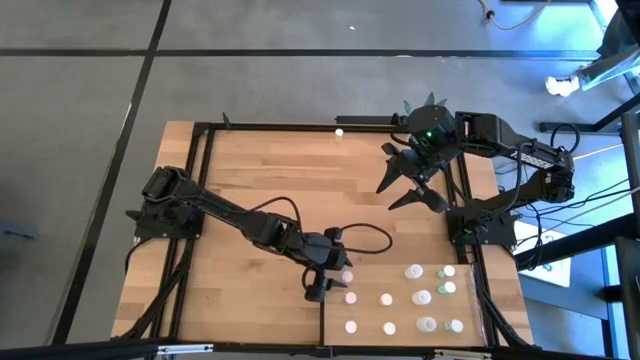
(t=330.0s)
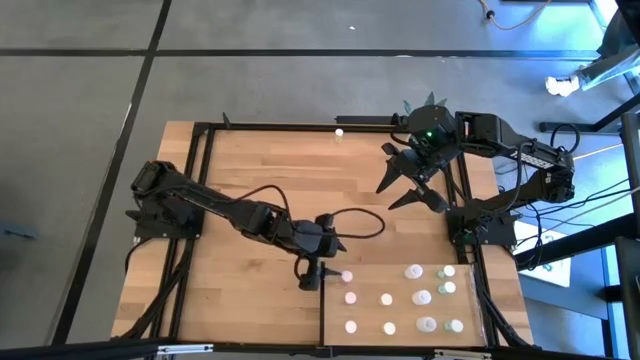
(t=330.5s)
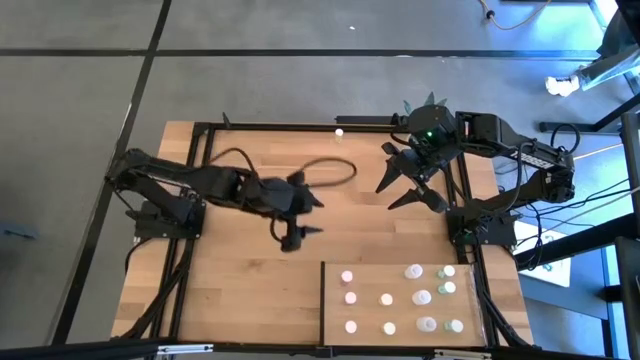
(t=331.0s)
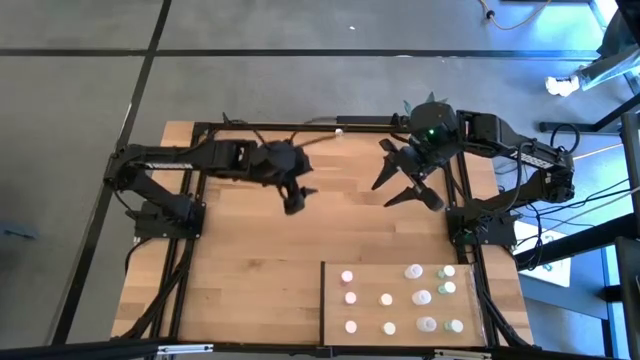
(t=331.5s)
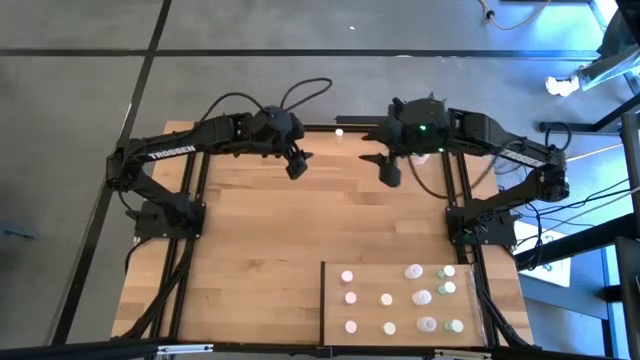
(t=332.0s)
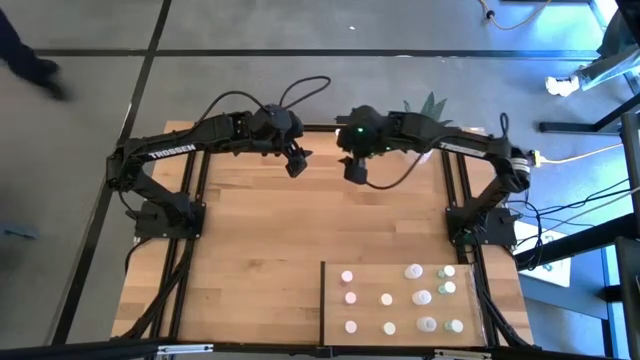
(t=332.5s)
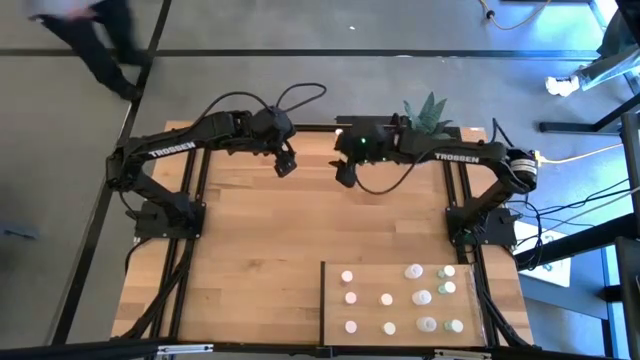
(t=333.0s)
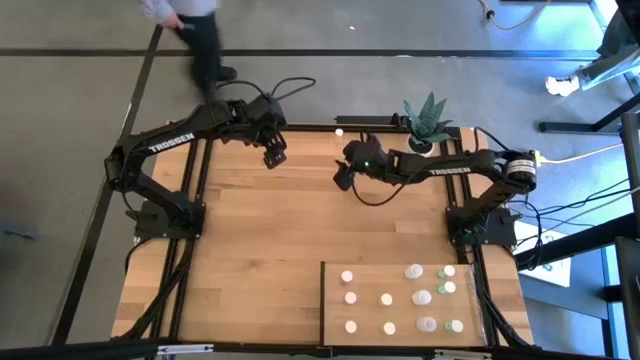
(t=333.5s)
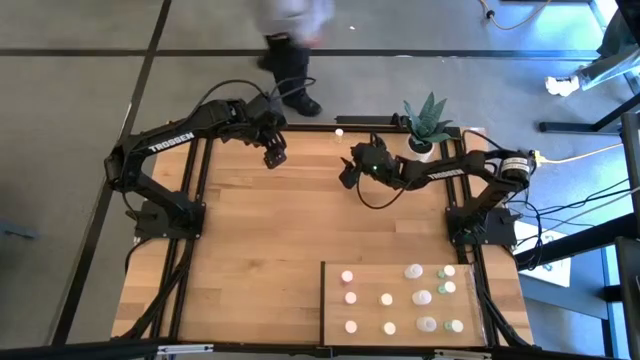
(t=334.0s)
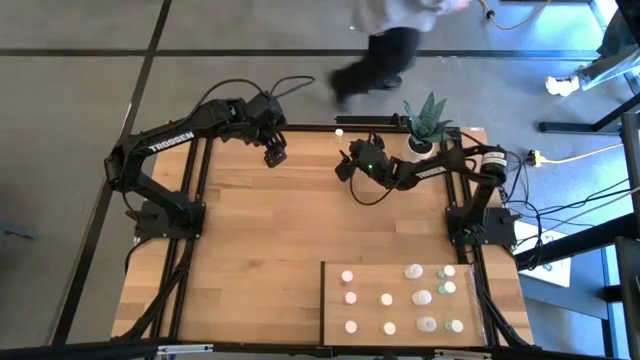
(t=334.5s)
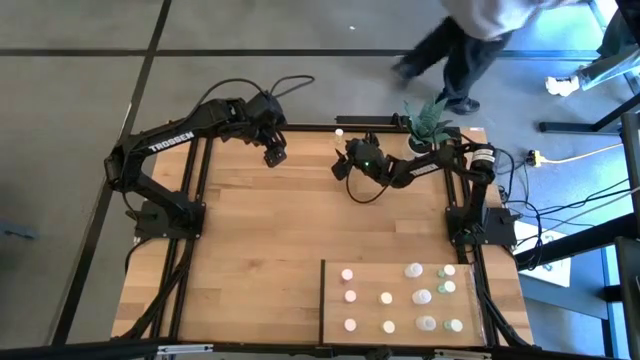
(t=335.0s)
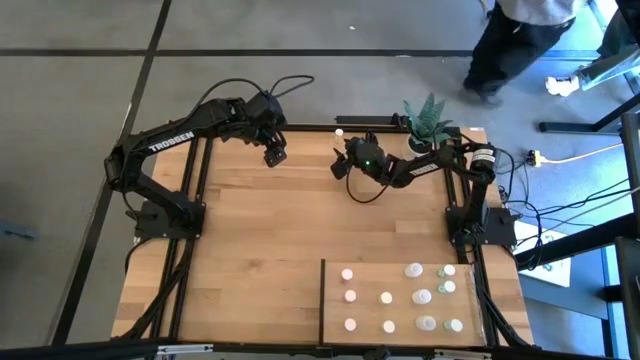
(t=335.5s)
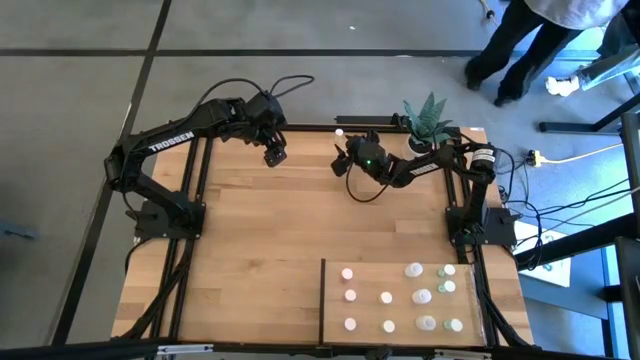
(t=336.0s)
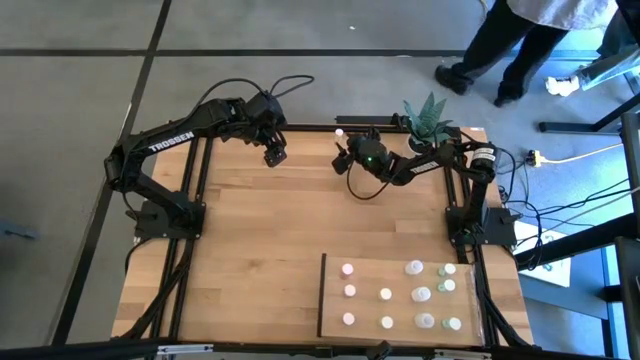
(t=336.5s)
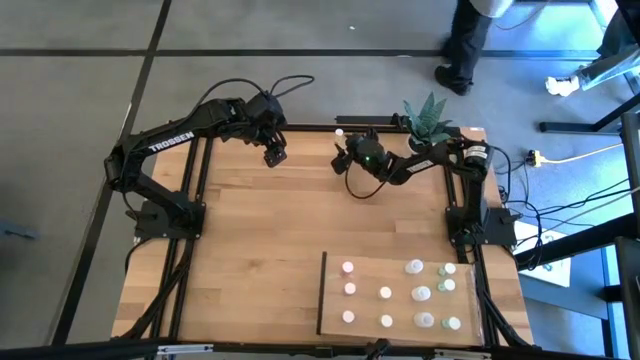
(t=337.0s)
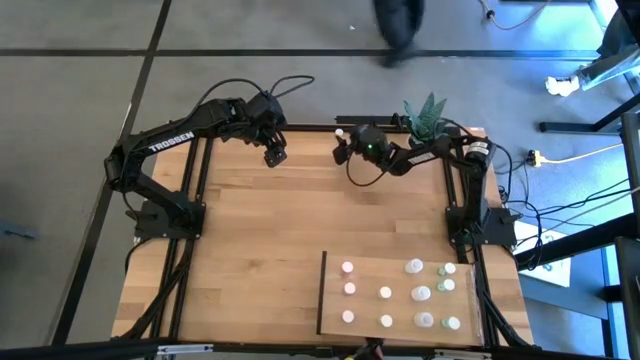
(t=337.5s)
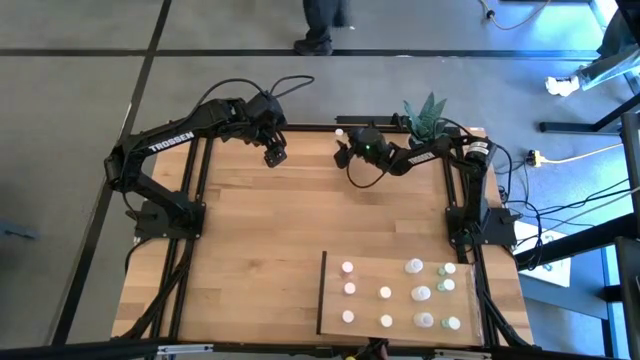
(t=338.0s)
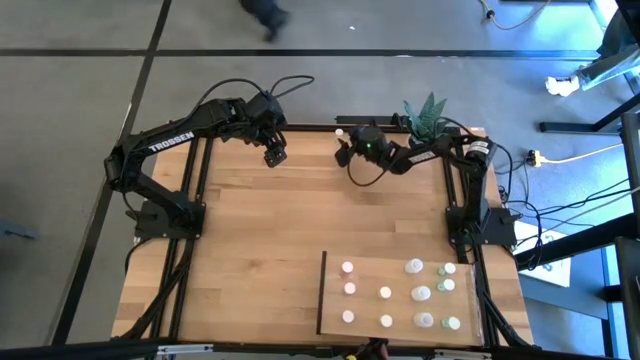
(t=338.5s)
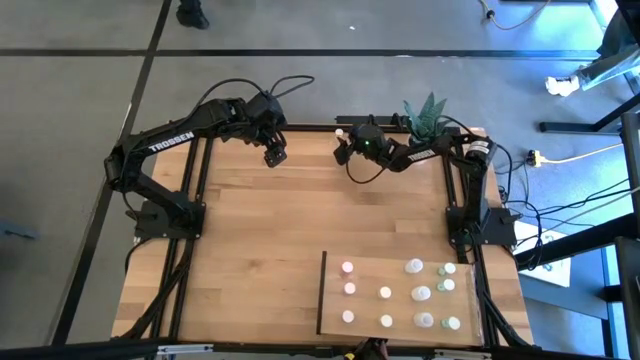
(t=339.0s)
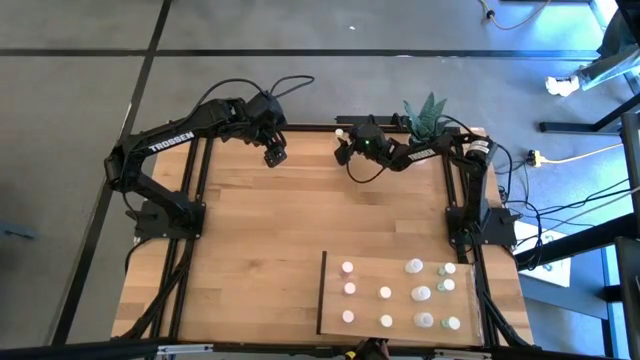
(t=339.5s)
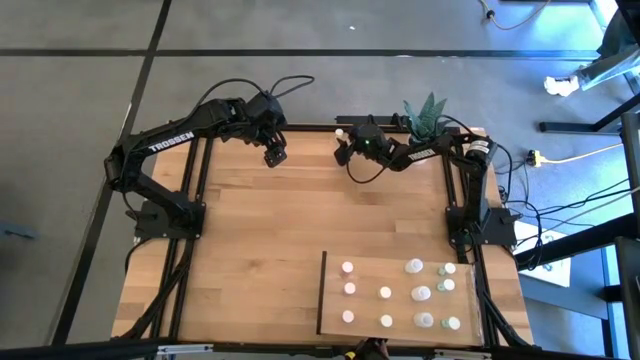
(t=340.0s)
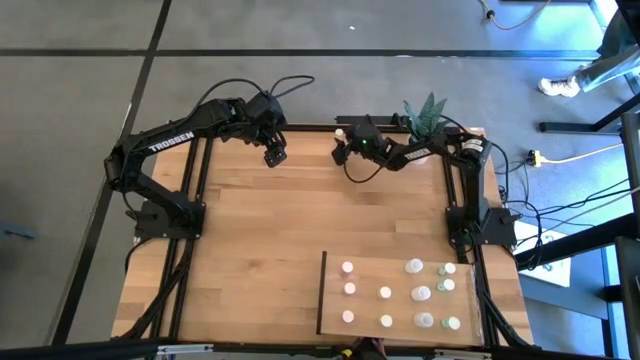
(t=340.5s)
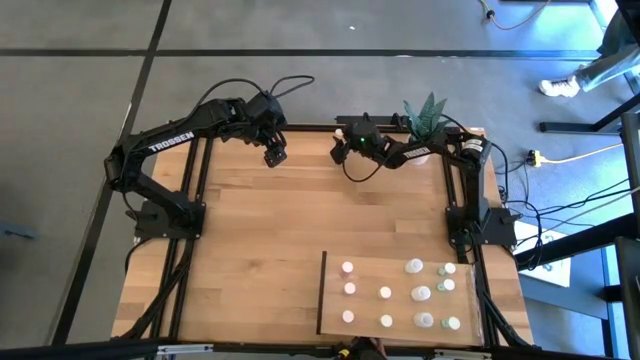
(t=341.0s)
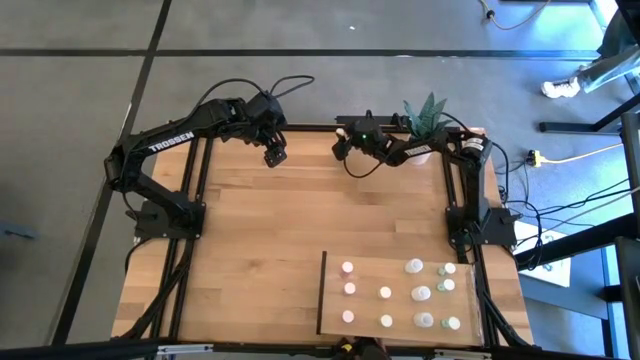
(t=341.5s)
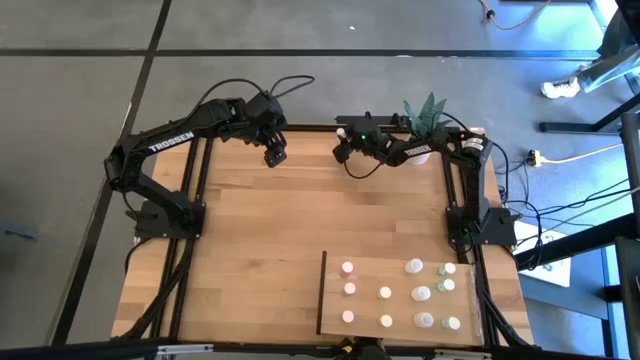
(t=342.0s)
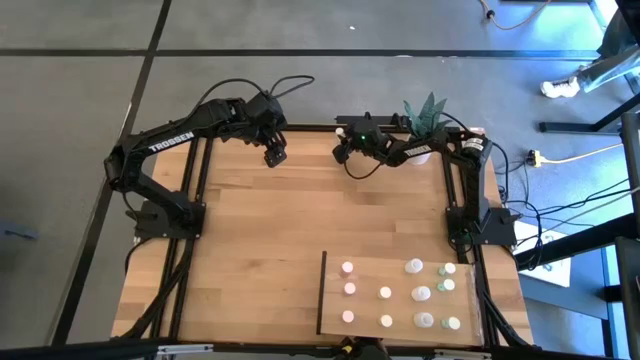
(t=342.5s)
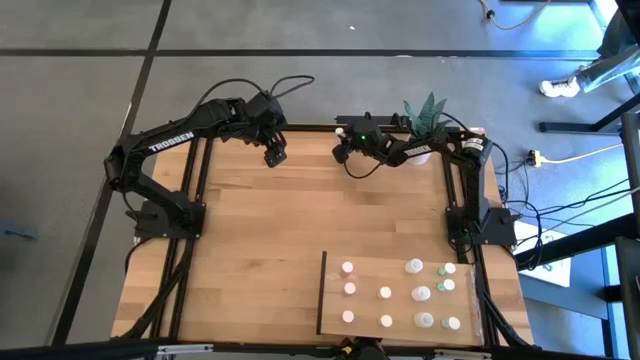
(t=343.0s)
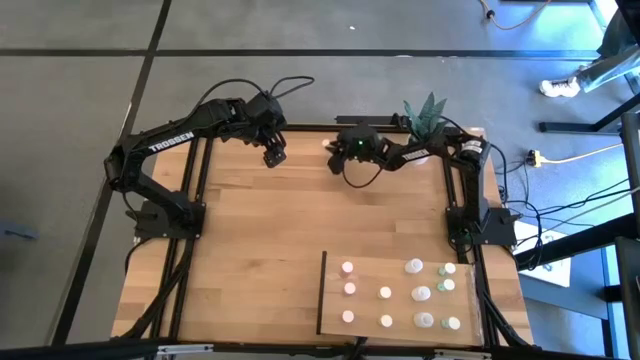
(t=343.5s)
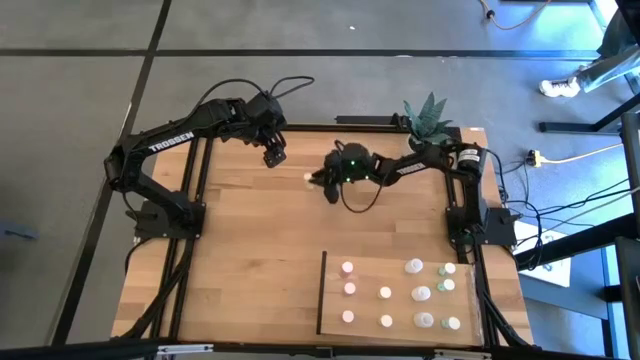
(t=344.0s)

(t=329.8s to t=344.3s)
Task: Pick and place medicine bottles onto shelf by color
Put the yellow pill bottle on the shelf aligned with the other yellow pill bottle

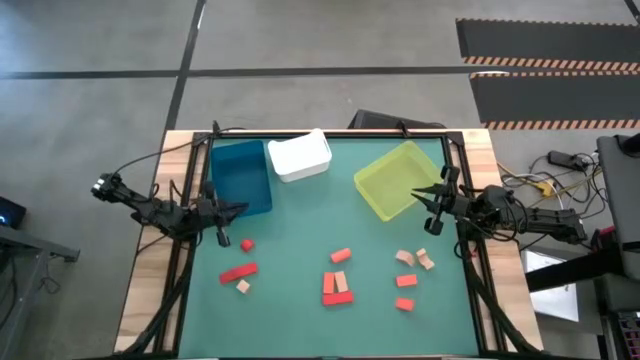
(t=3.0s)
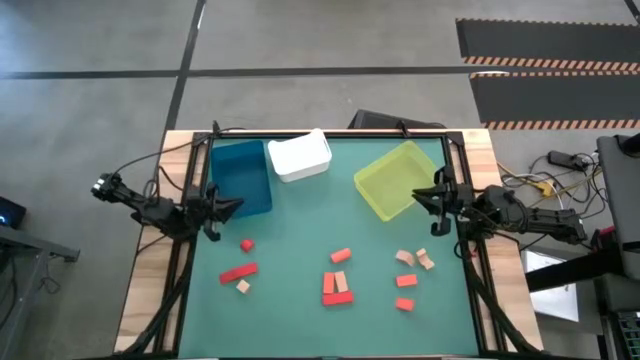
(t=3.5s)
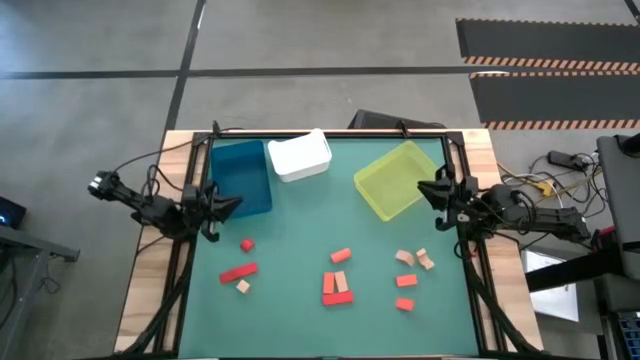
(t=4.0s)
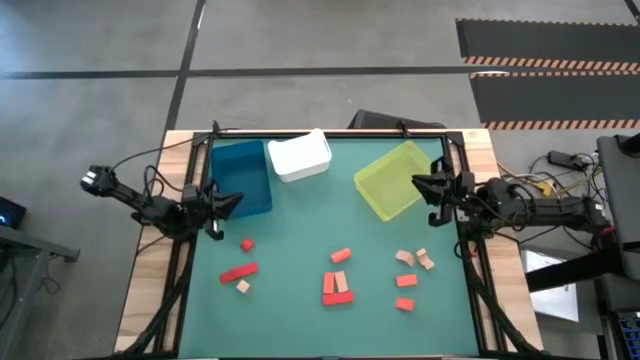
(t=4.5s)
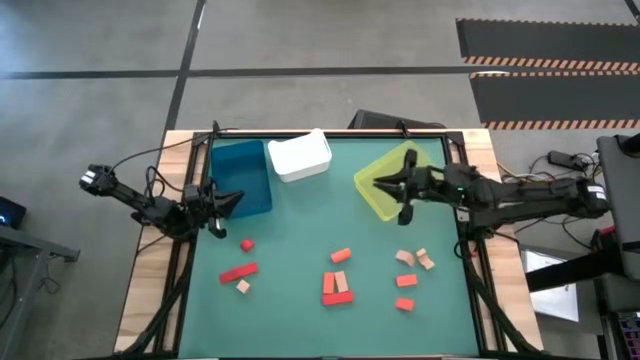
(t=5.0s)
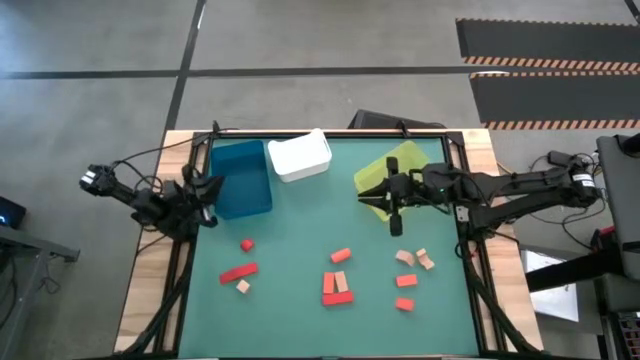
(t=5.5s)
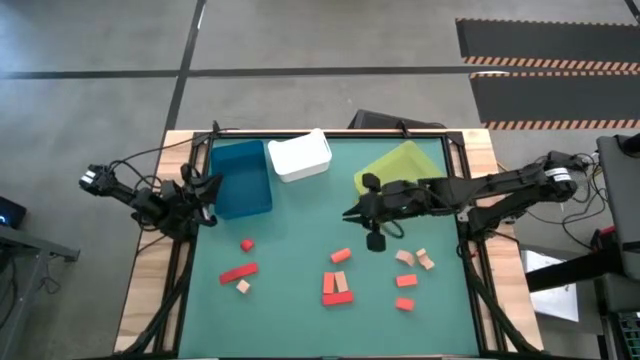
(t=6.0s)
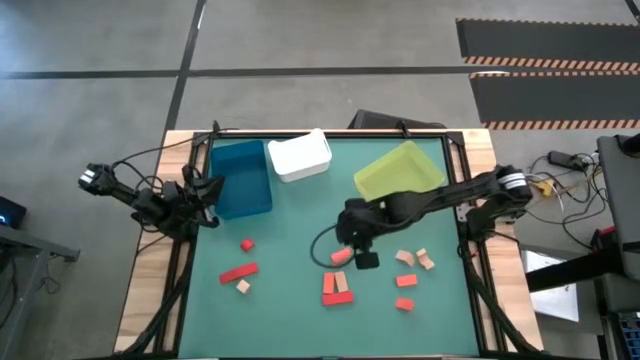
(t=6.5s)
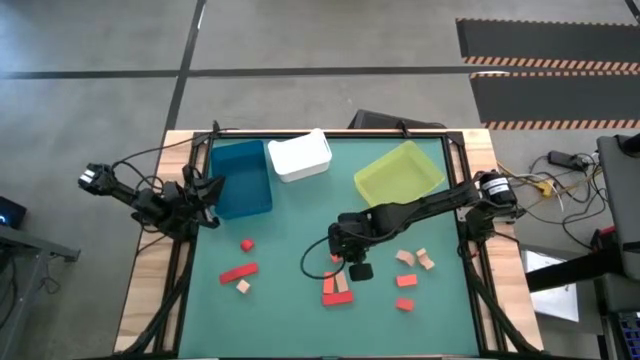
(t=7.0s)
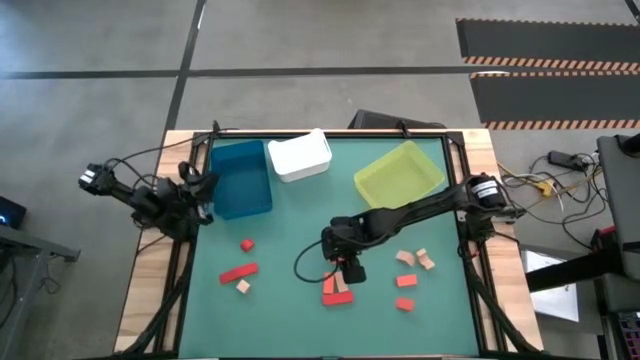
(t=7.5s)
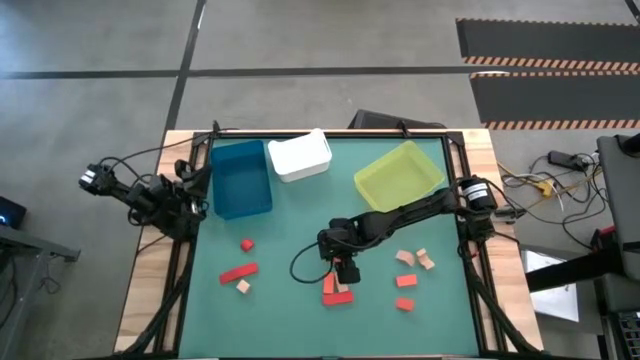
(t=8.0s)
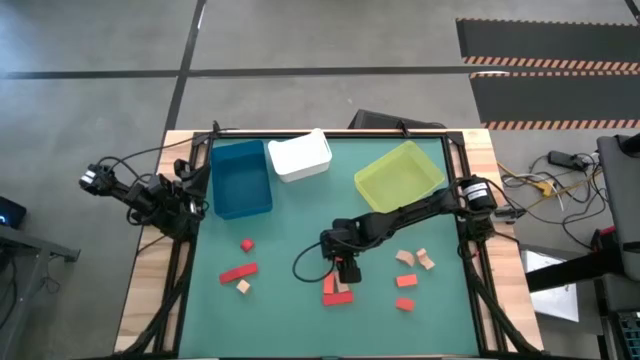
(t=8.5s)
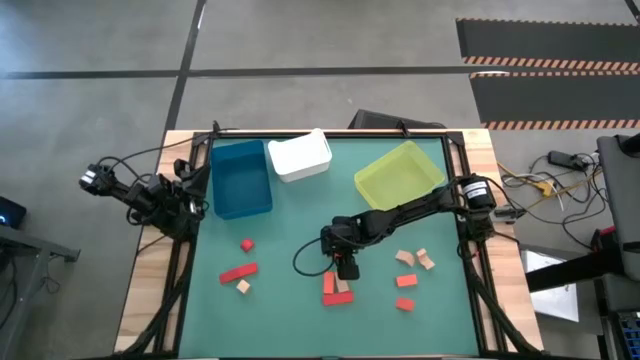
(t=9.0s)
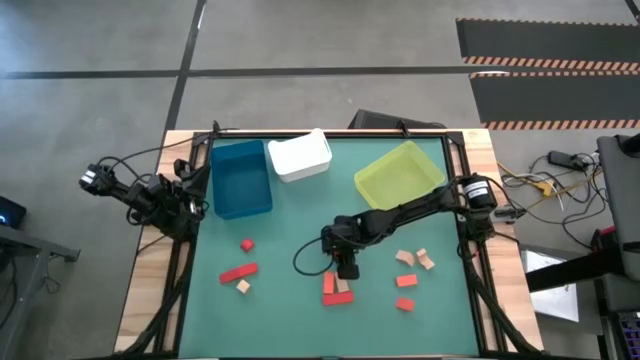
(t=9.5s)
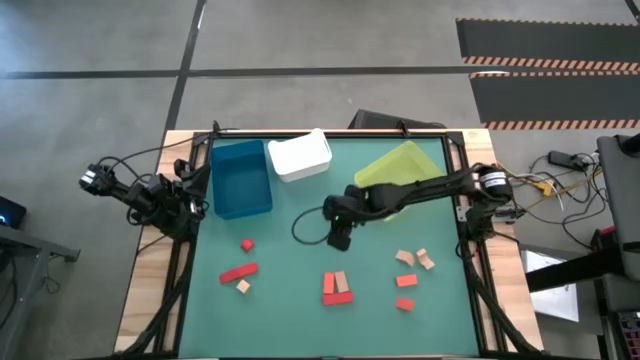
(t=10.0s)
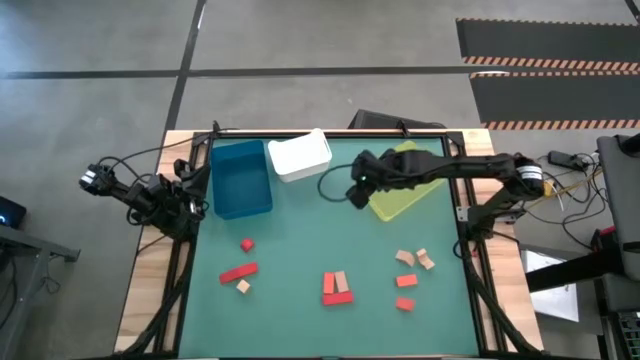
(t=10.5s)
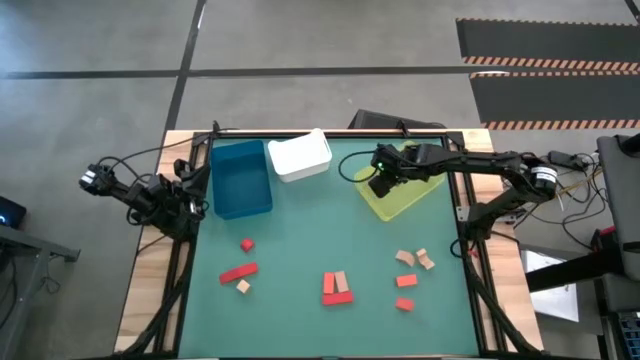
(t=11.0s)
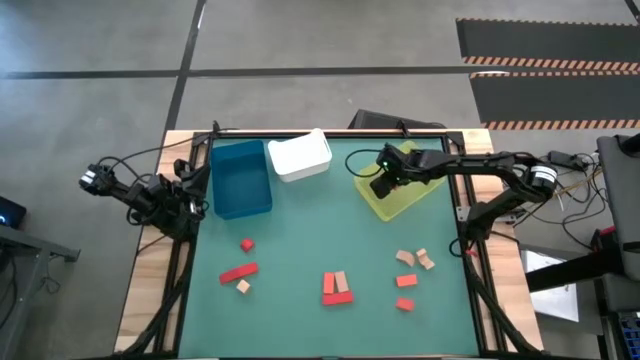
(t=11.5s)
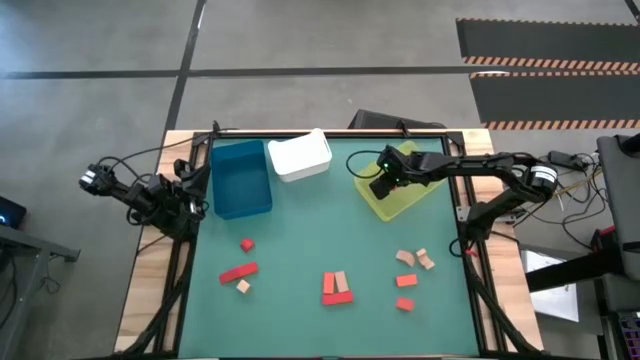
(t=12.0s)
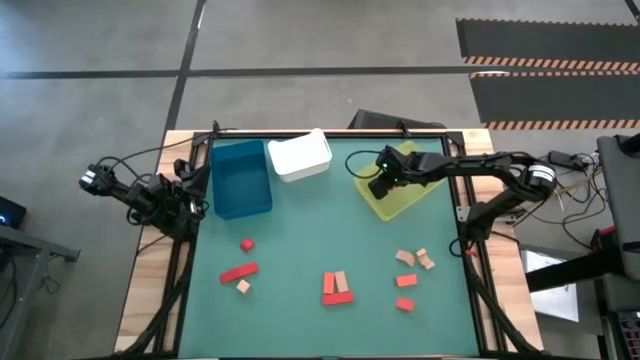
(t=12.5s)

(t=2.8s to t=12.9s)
Task: Sort & place blocks by color
Put the orange block into the yellow bin
